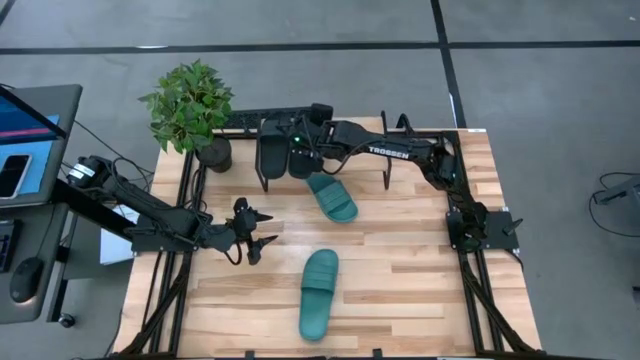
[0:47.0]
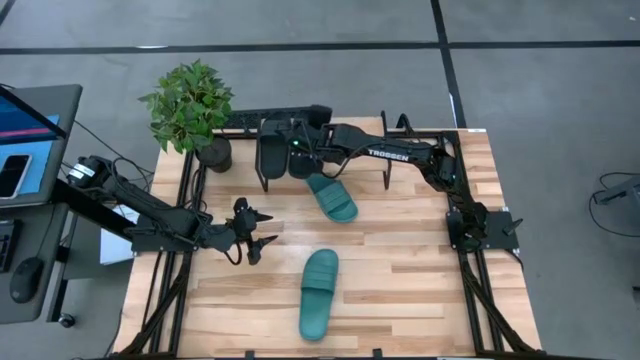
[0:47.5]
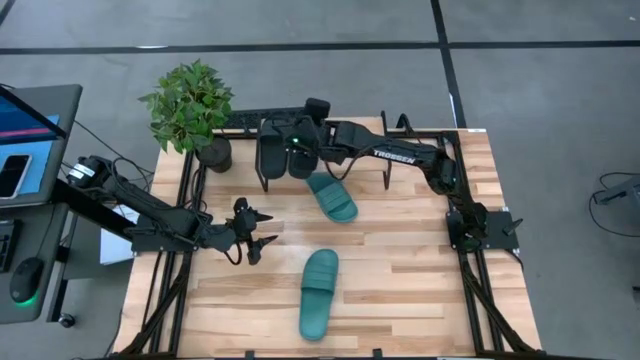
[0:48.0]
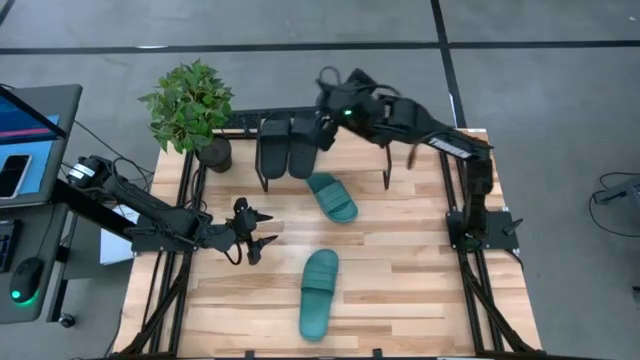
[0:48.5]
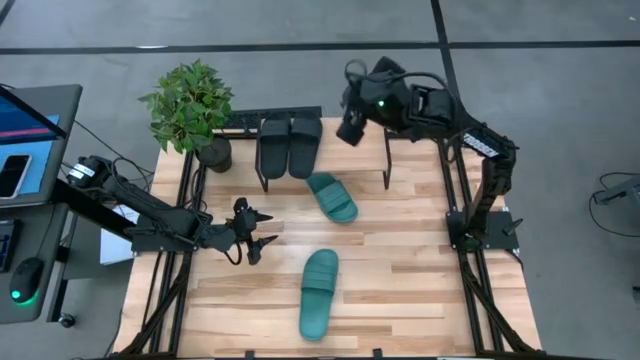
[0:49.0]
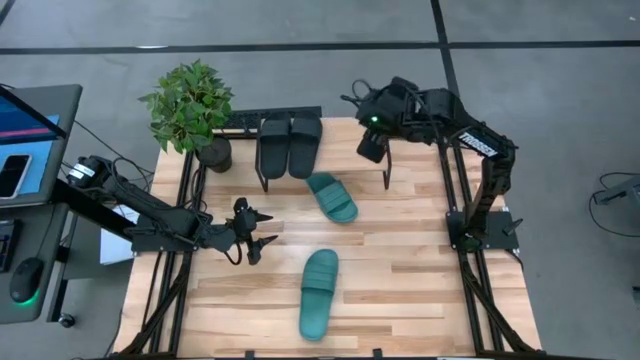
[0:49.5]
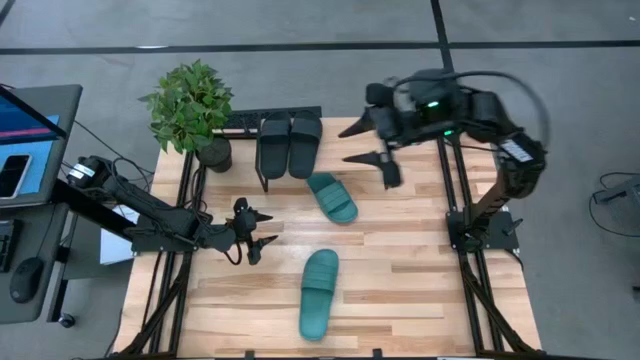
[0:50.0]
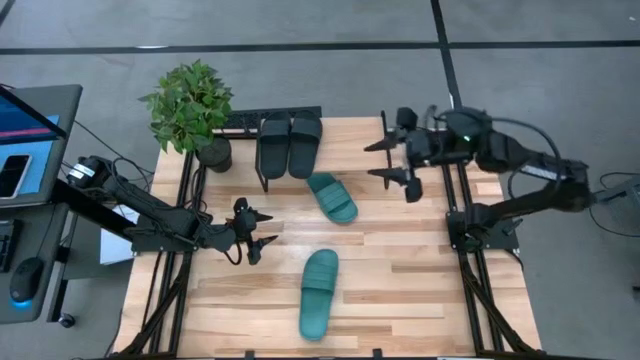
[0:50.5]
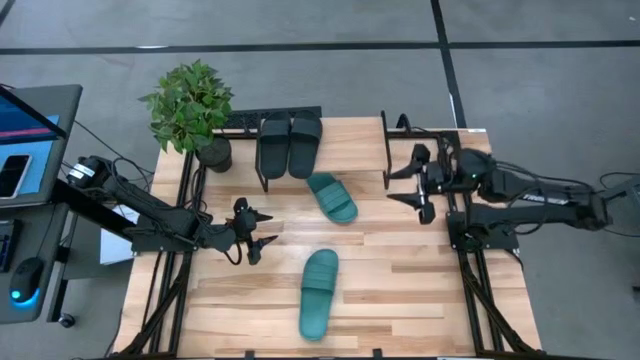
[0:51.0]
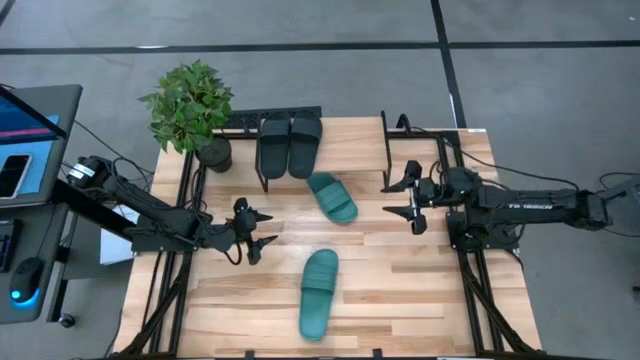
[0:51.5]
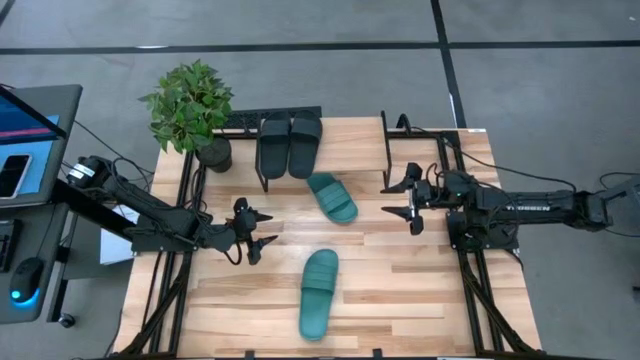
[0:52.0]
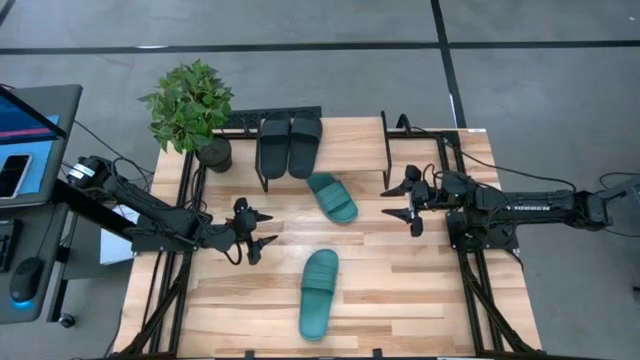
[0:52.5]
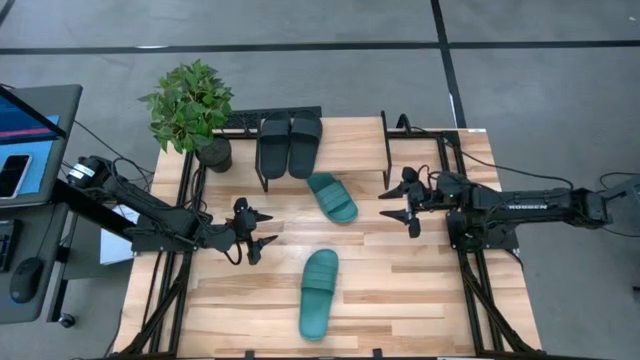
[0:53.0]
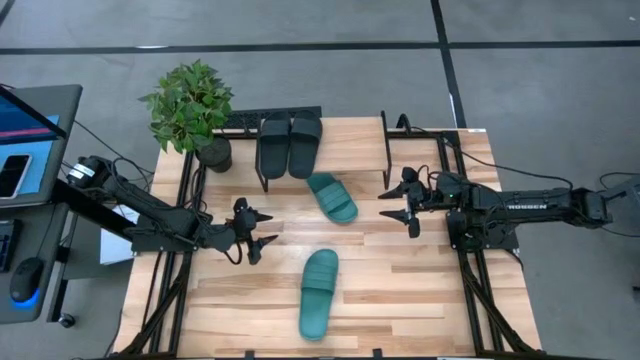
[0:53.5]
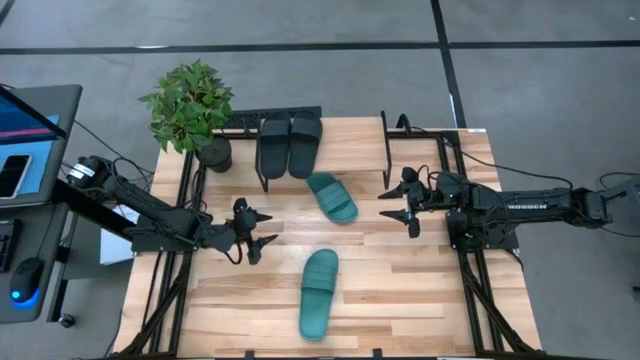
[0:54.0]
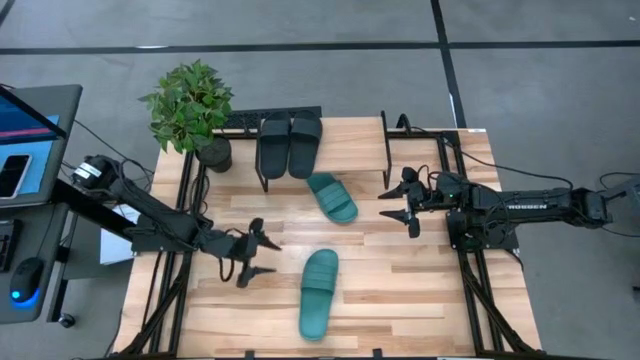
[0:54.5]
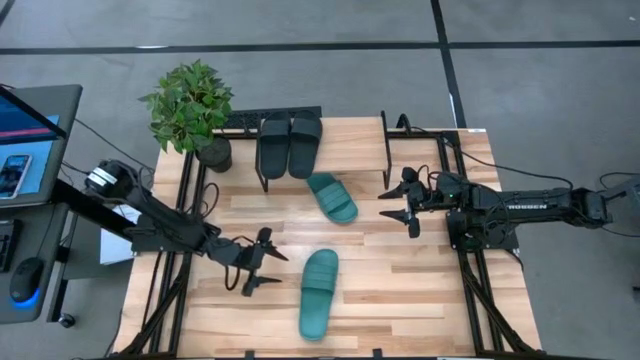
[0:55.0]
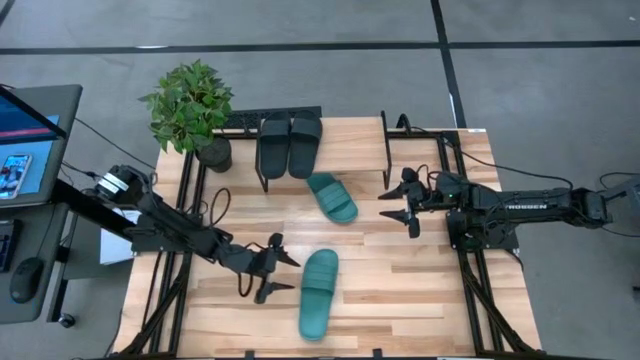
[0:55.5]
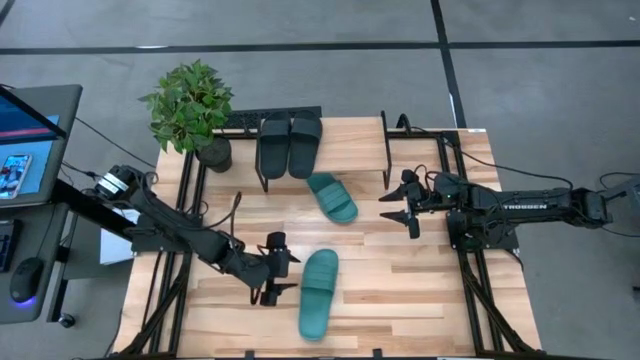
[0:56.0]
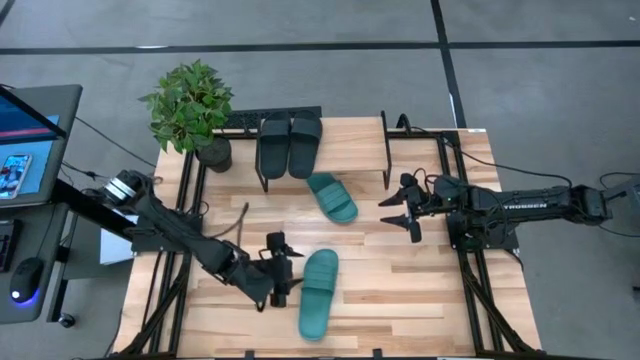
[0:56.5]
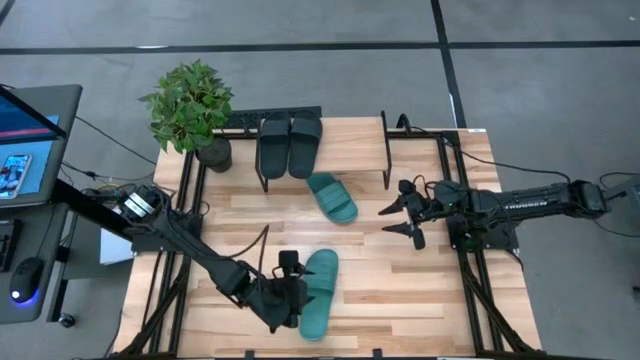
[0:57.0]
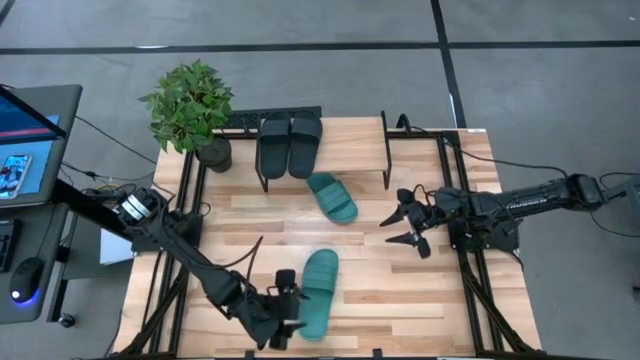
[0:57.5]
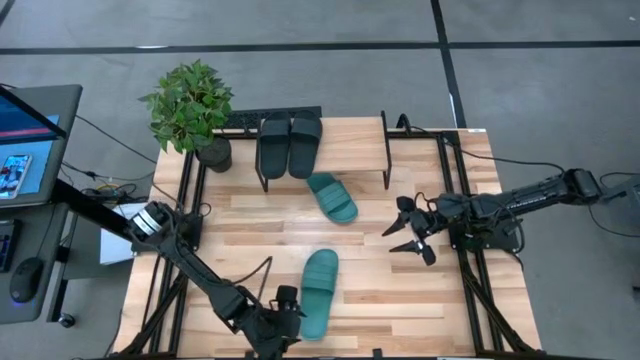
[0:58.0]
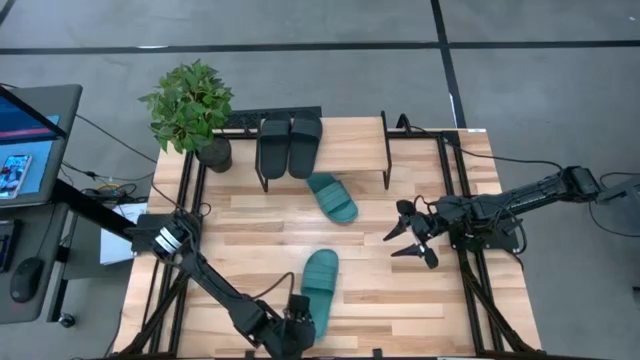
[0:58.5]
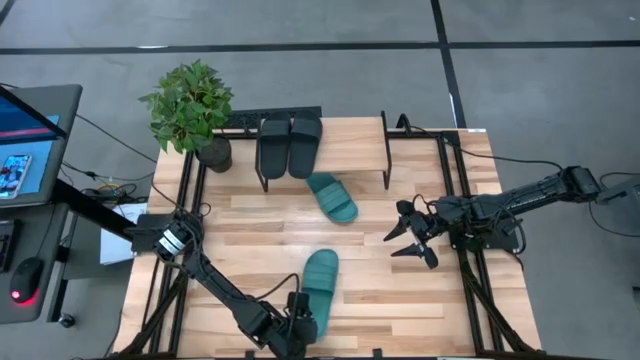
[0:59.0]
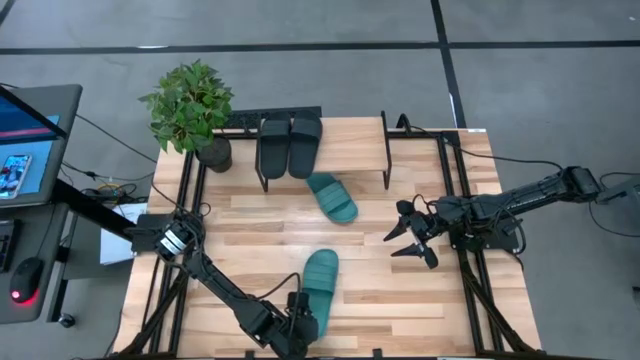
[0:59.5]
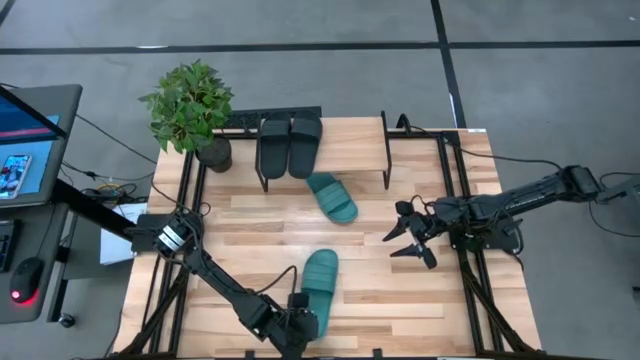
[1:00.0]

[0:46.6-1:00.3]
Task: Pick and place slides into the shelf
Put the bottom green pair of slippers on the shelf
